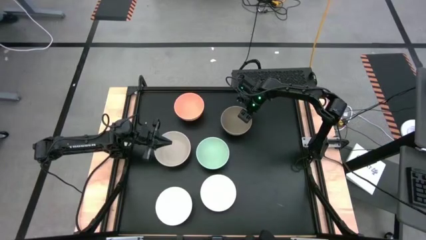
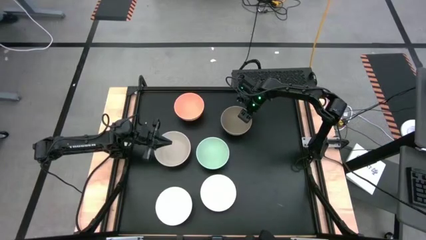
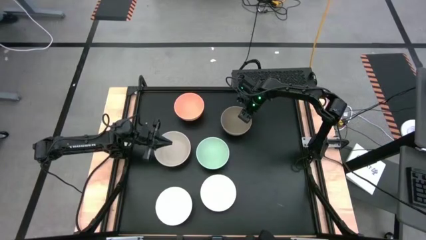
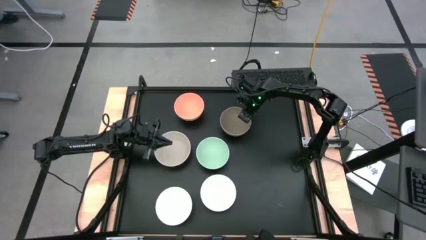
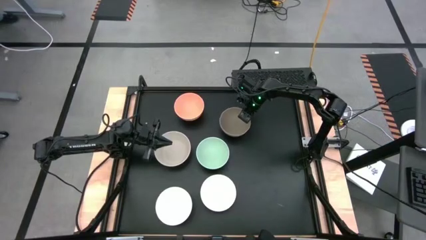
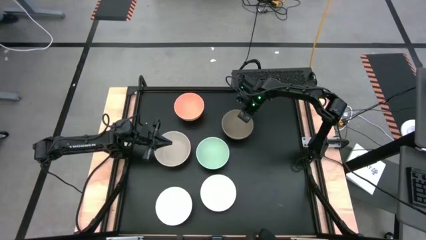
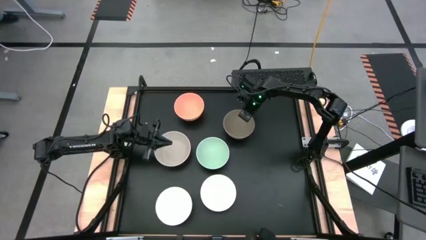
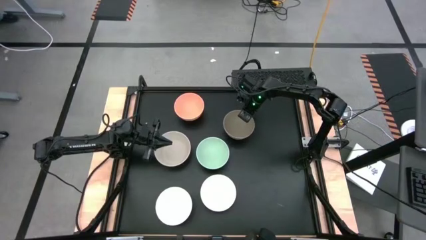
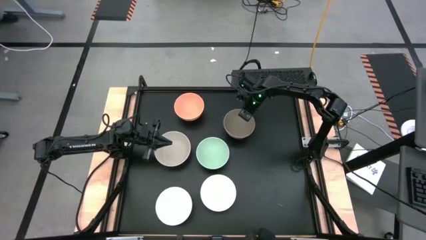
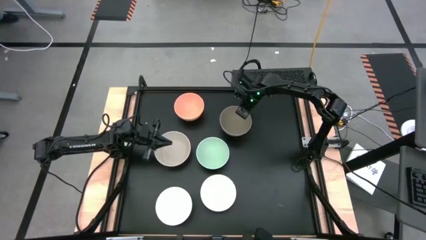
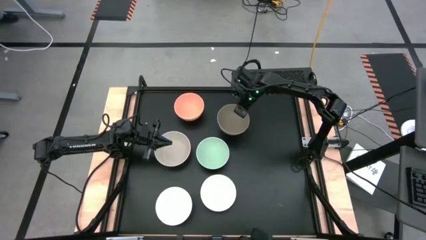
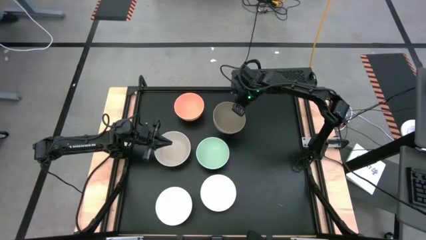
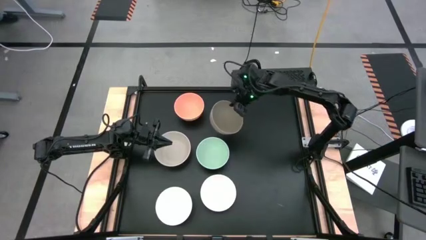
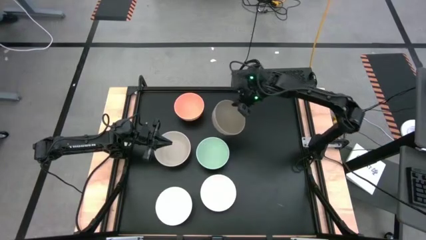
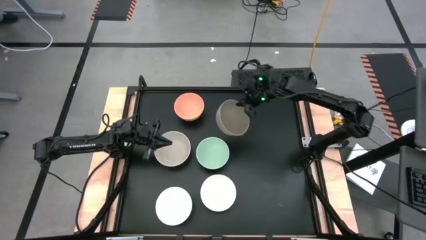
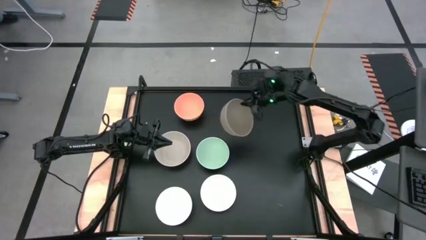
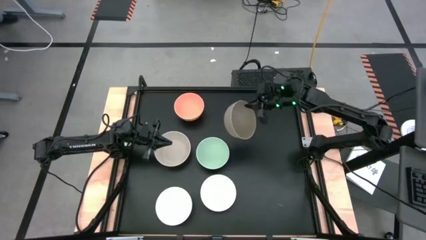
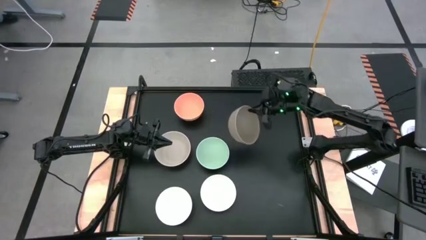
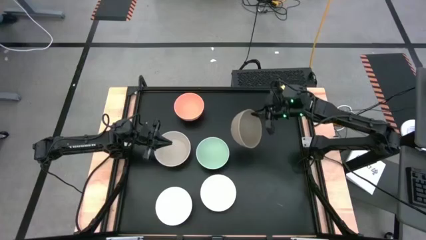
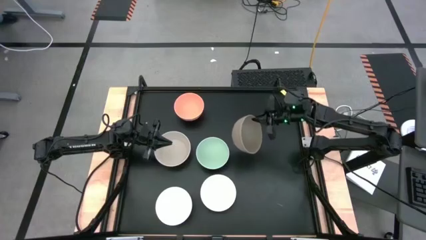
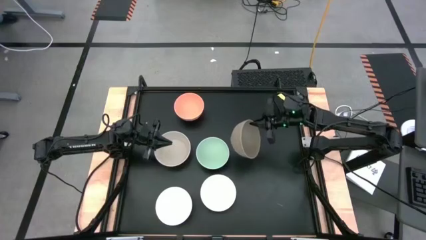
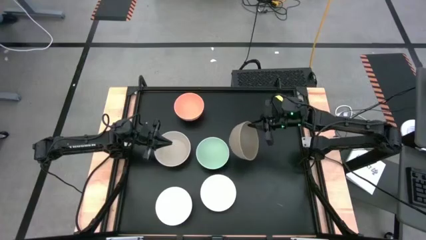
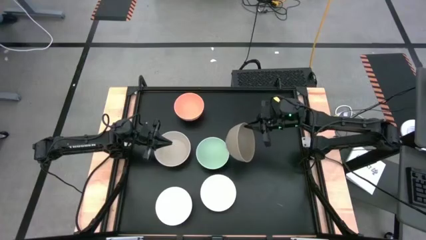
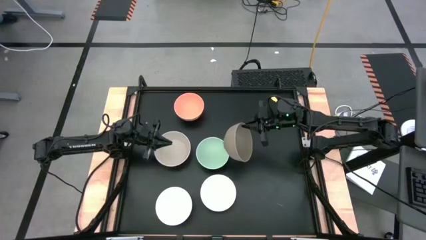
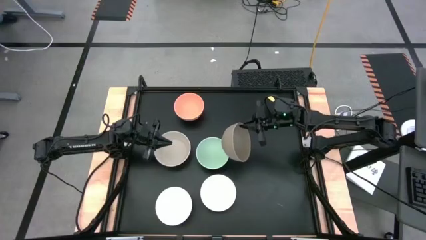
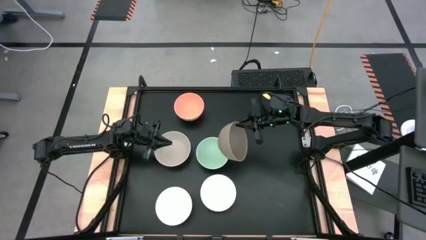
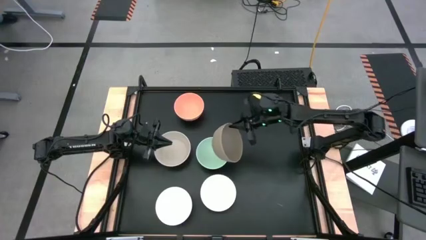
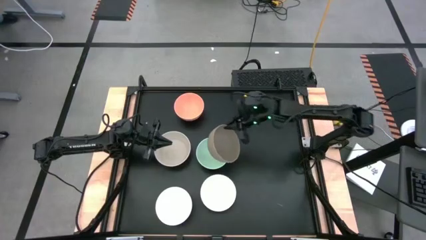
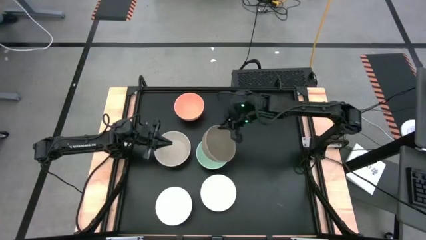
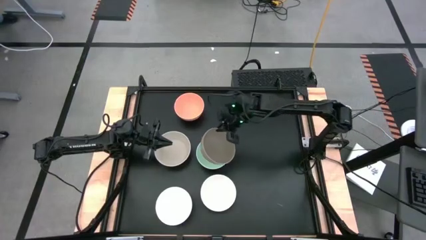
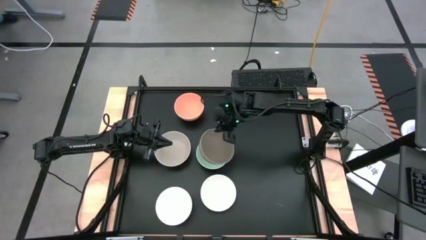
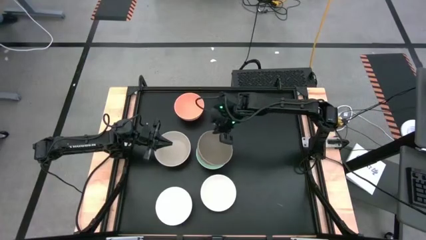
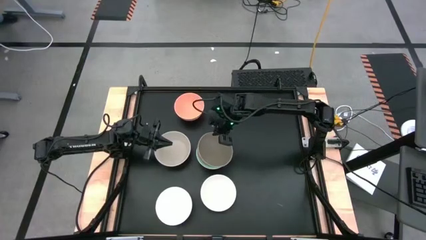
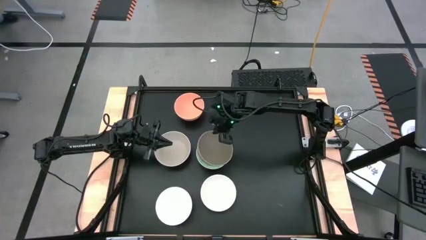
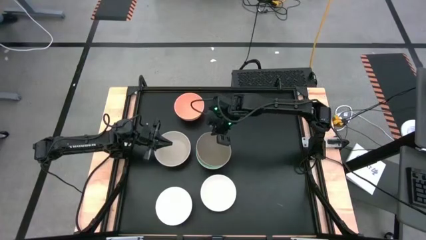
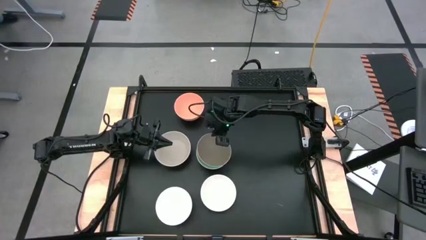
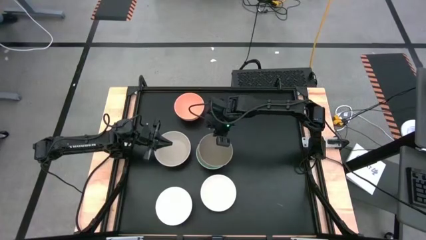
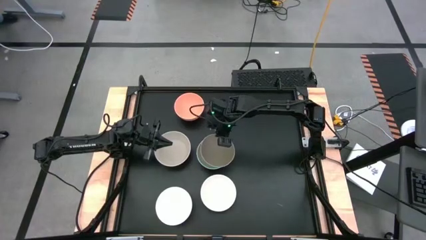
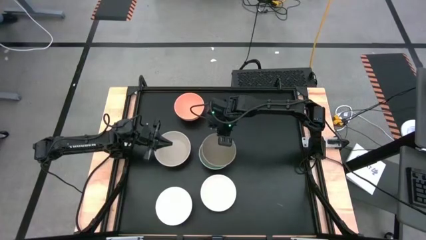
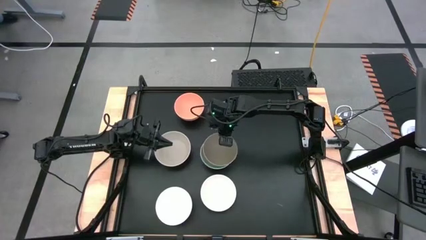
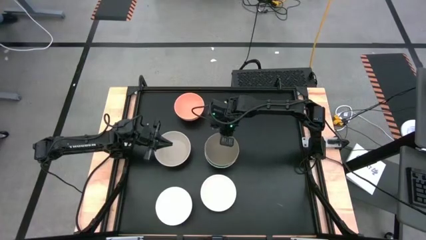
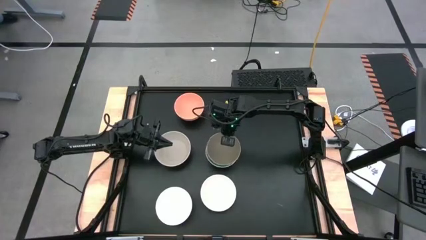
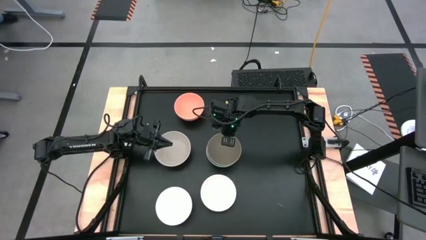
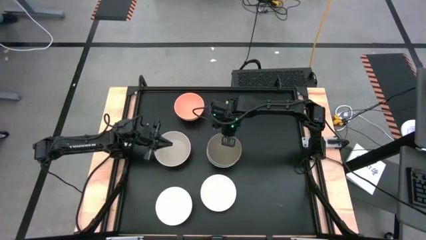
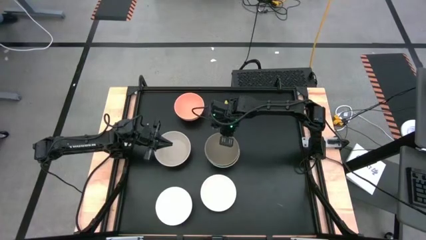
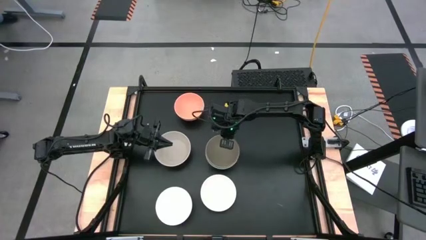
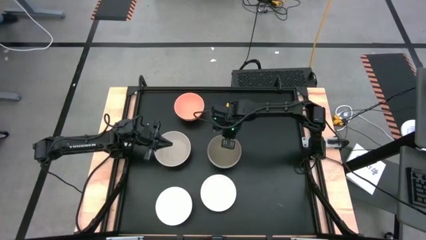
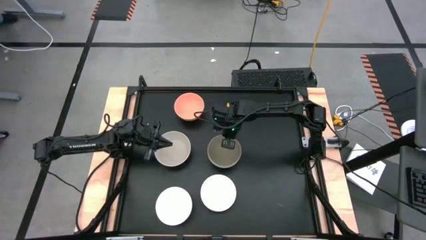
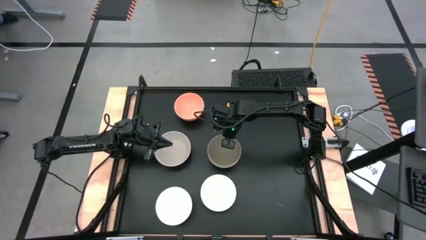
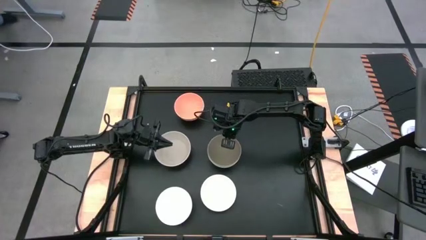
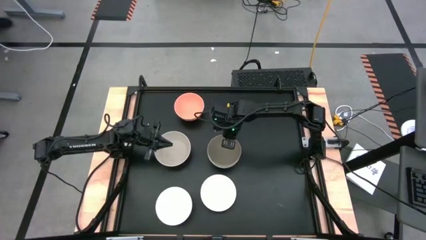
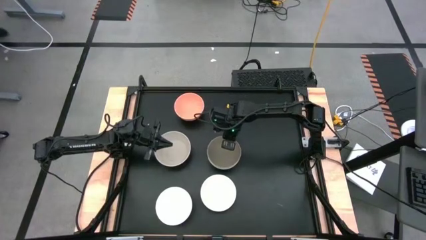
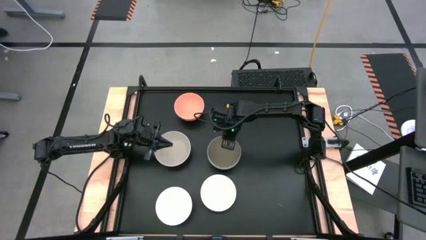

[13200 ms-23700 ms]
Task: Nest bowls inside each other
Stack the brown bowl on top of the green bowl
